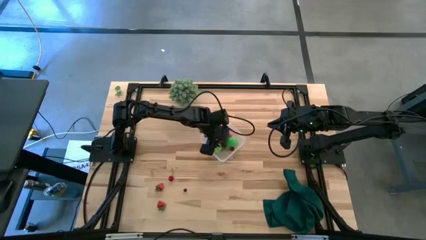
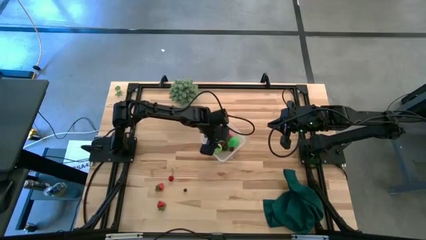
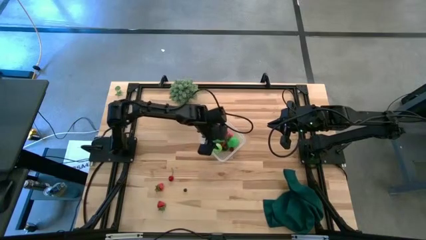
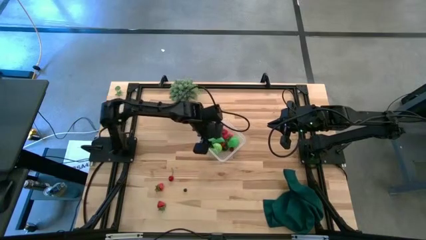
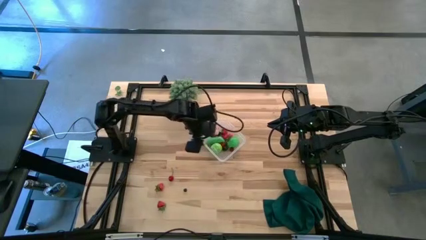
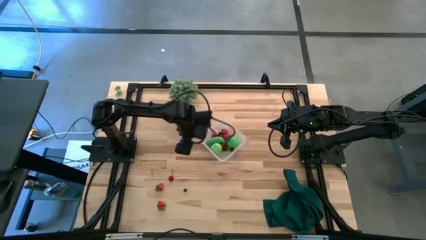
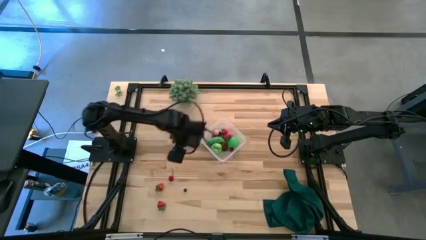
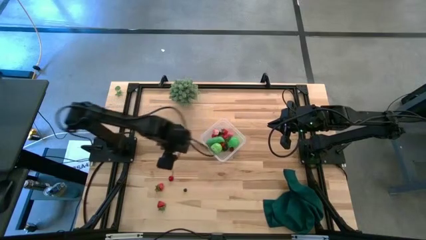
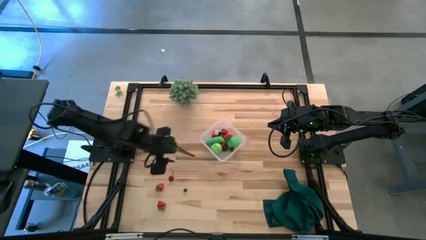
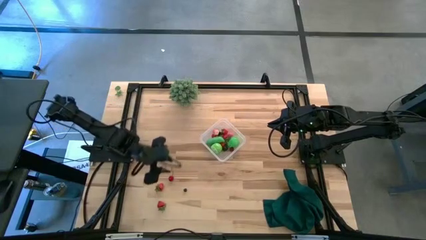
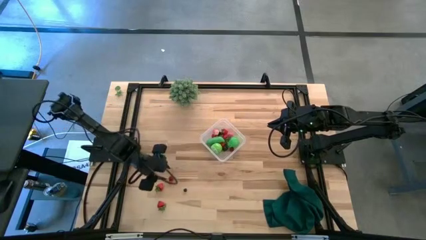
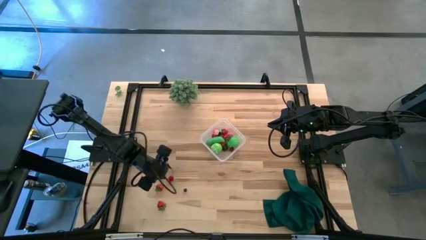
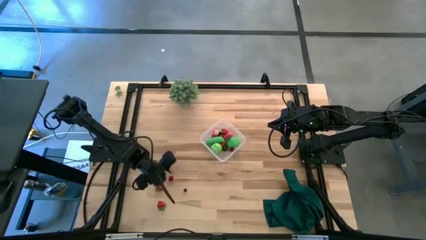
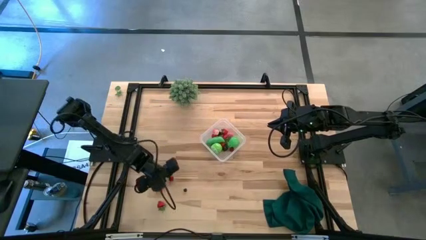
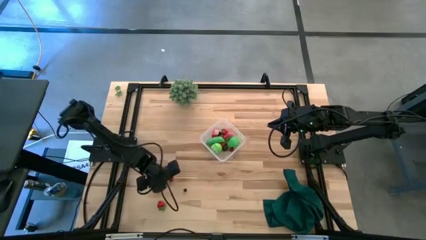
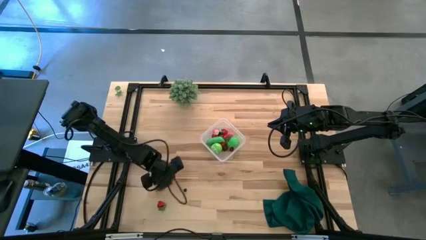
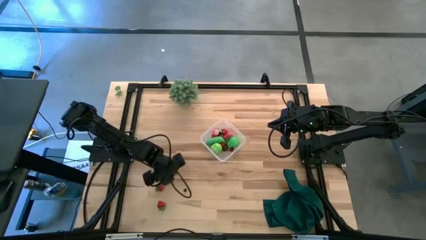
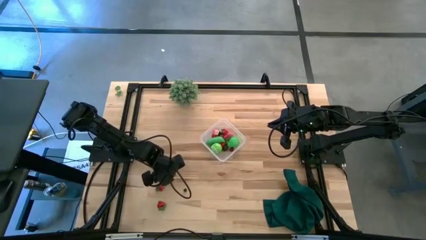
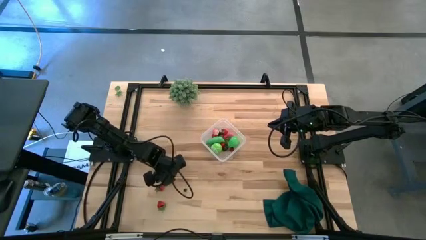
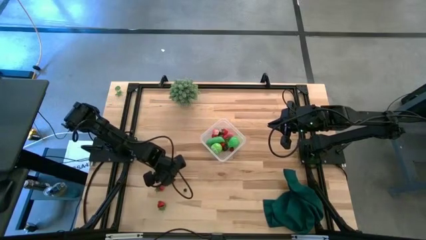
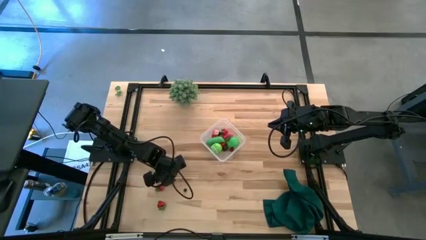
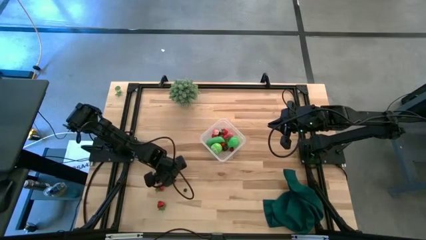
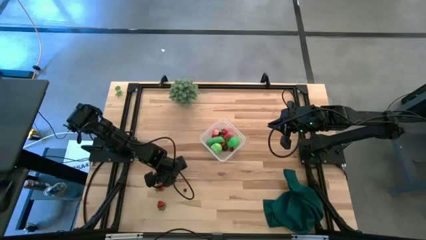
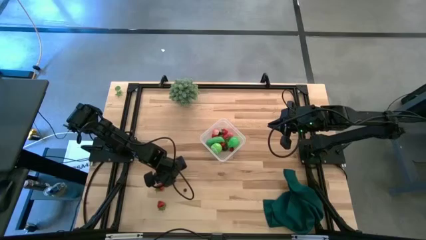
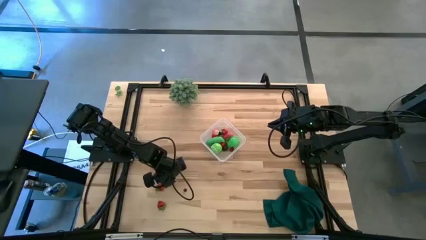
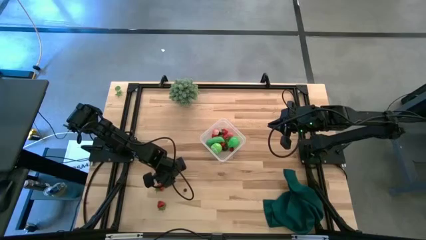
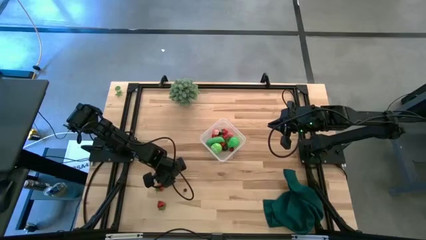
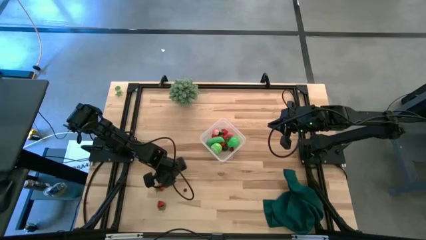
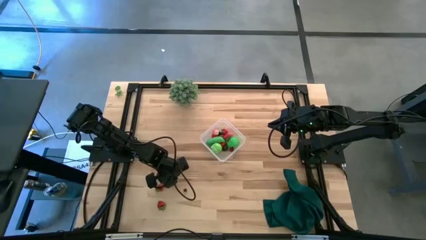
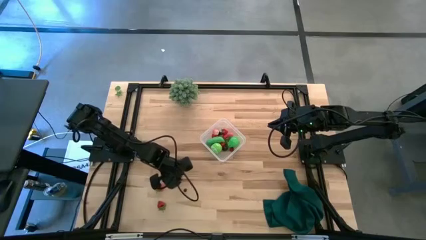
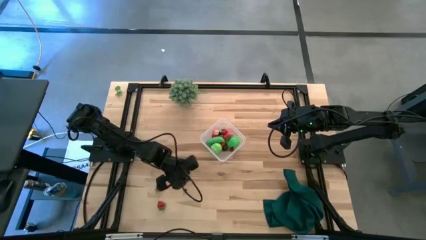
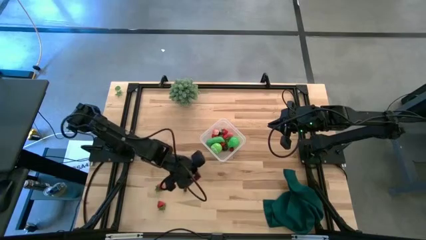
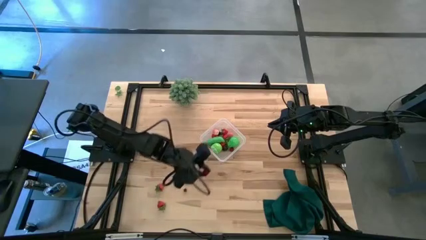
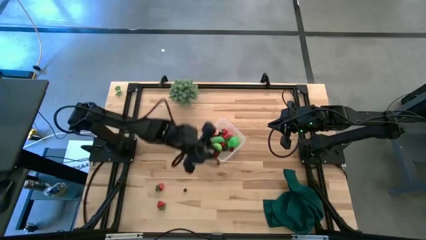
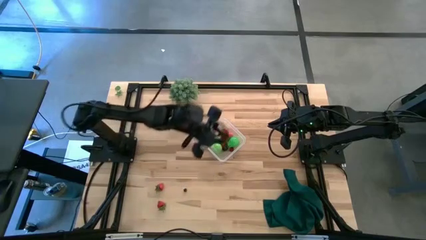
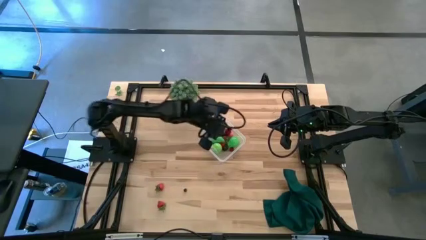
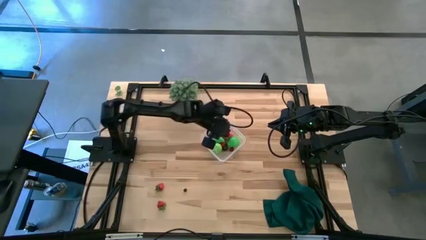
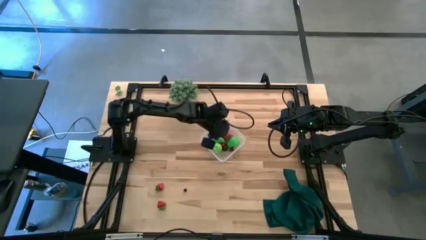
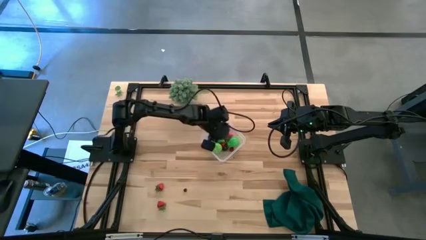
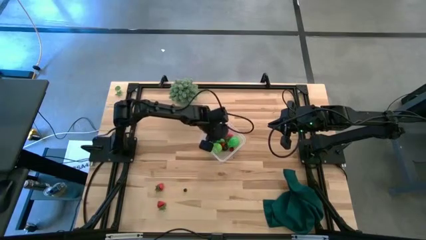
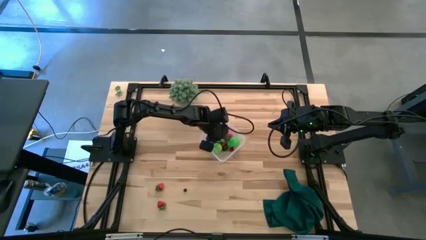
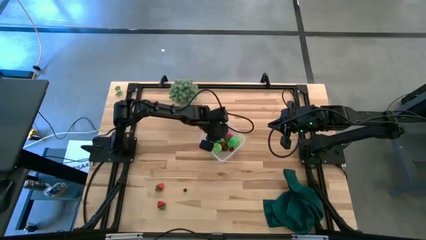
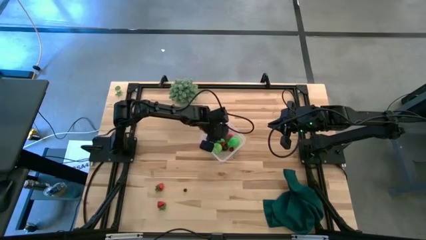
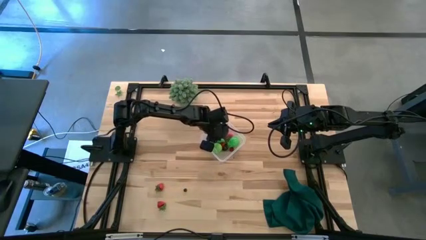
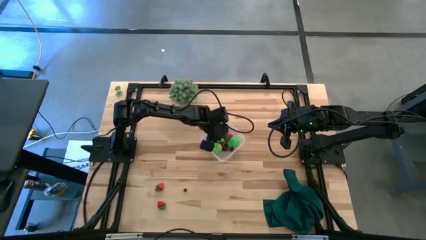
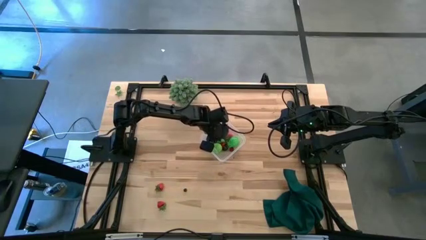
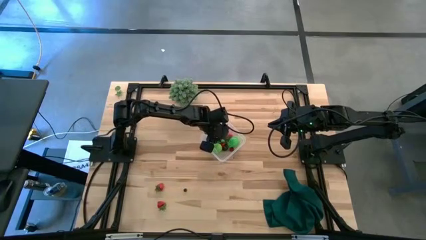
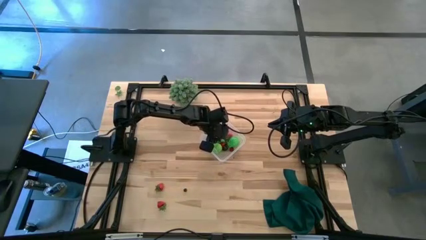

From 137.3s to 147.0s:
Task: Pick and placing Produce into tupperware
Put the red cherry into the transparent bin

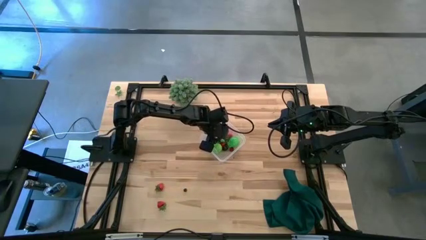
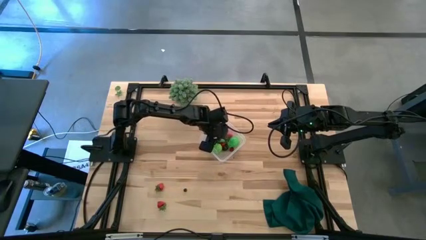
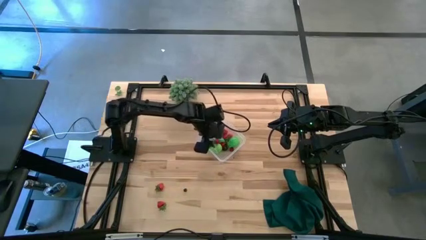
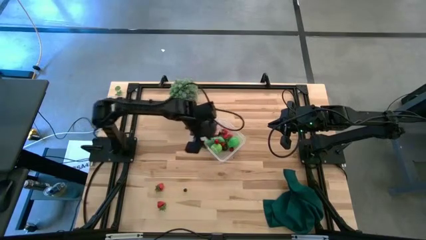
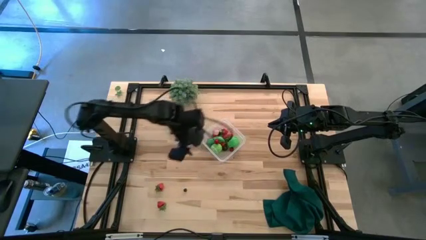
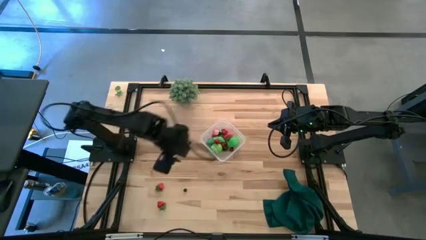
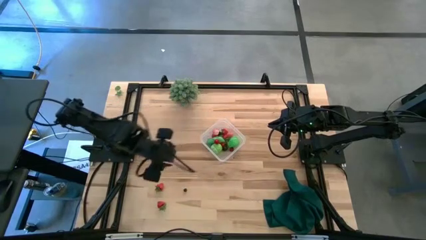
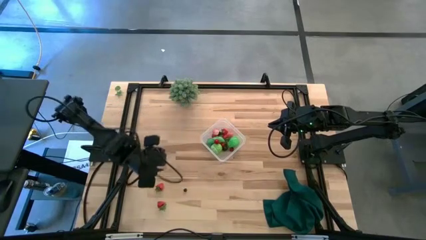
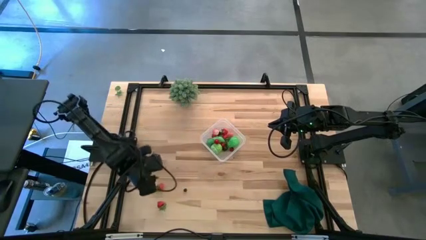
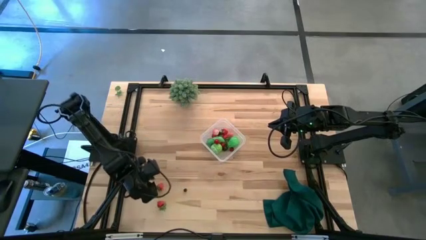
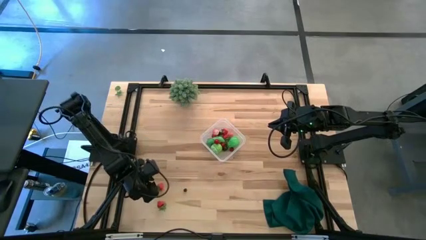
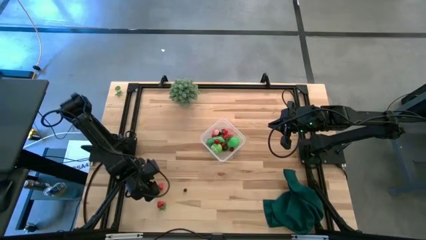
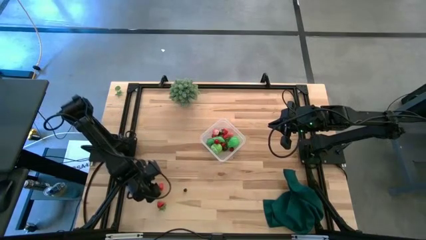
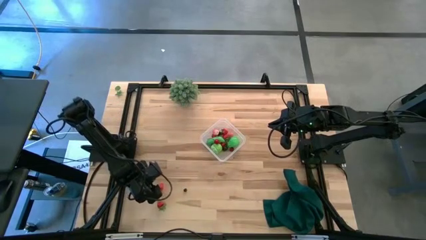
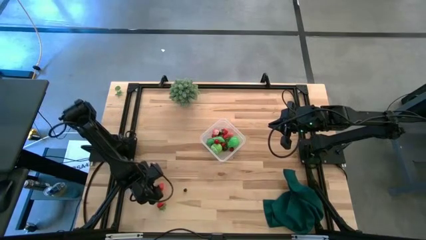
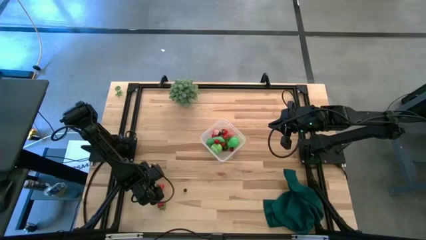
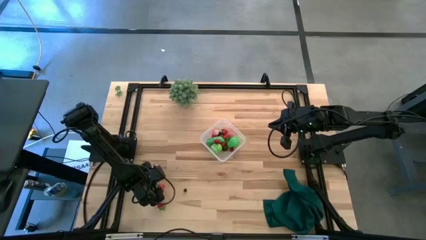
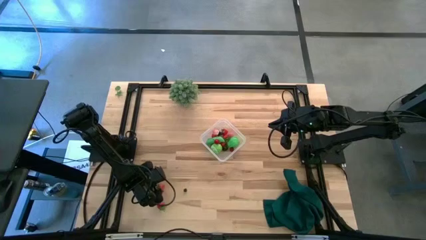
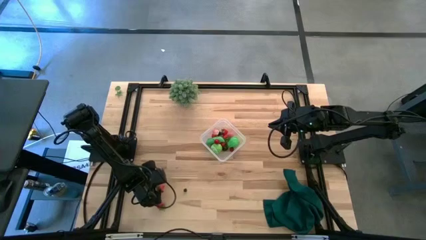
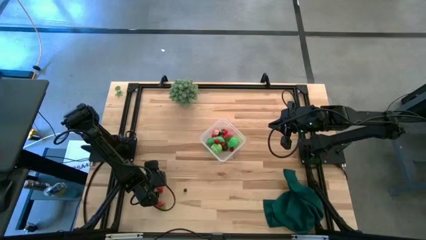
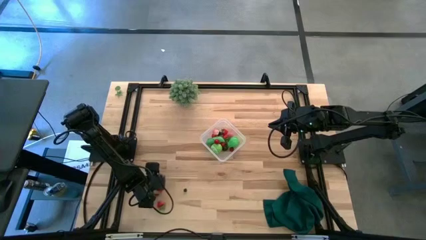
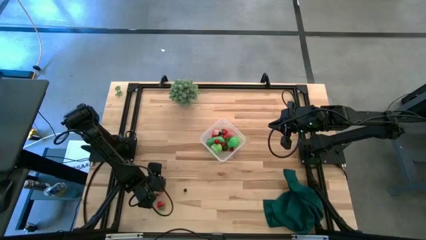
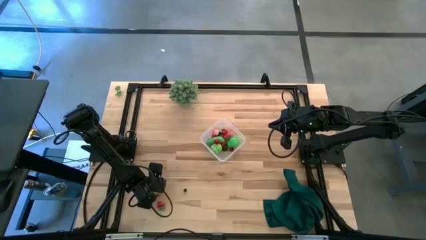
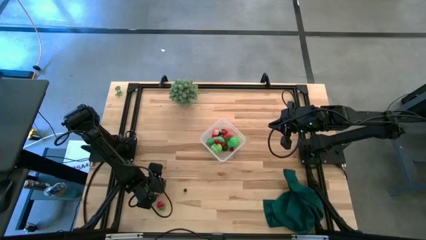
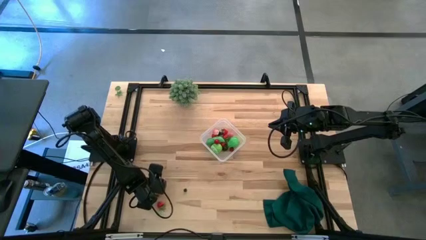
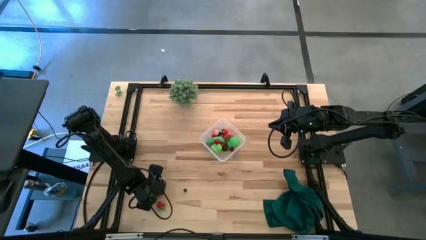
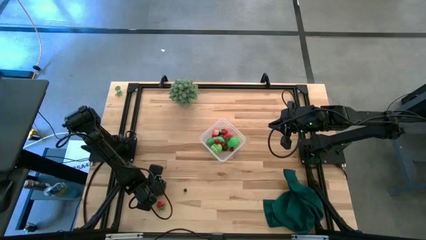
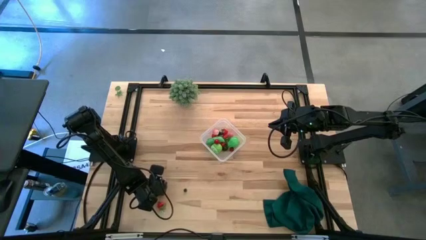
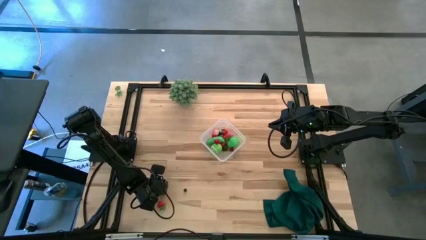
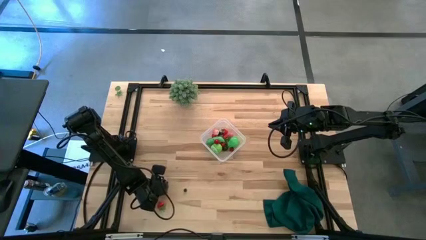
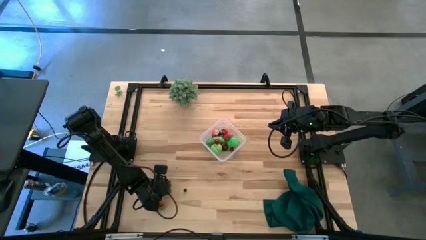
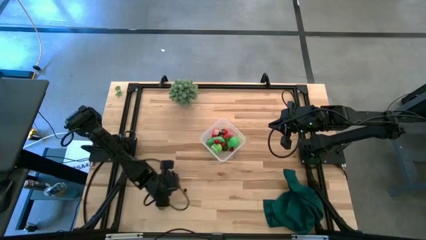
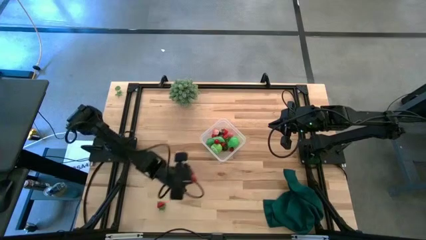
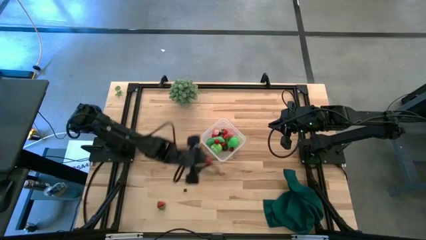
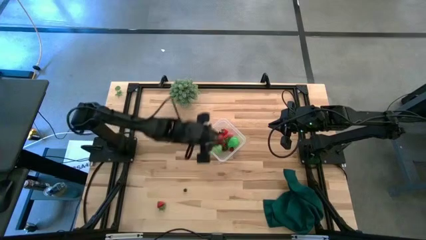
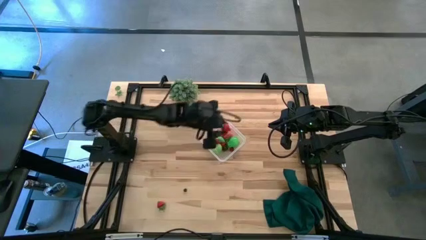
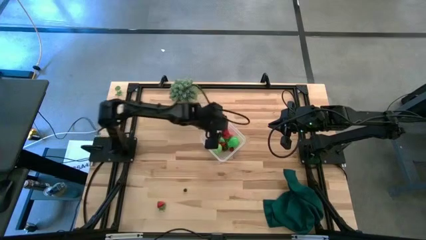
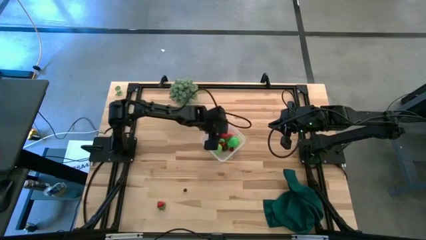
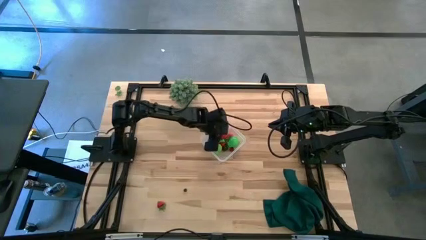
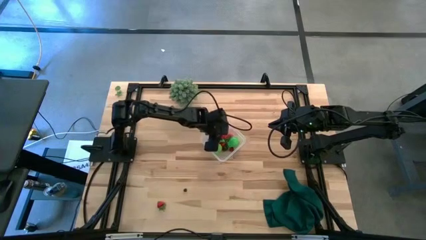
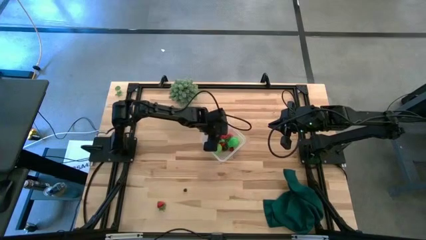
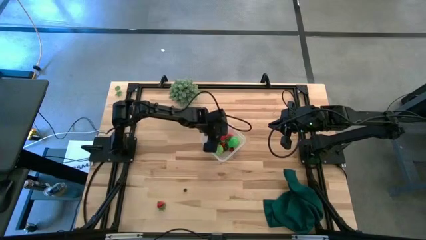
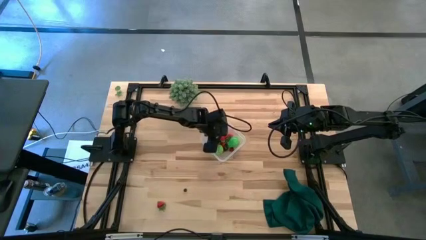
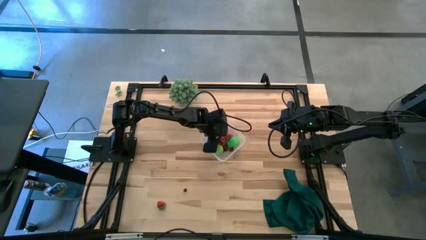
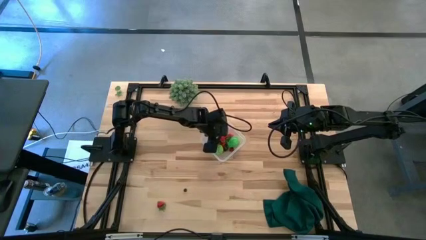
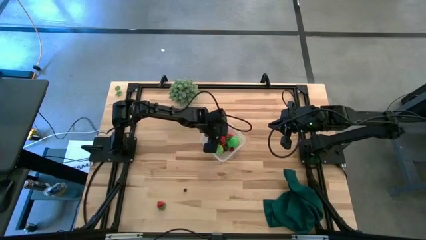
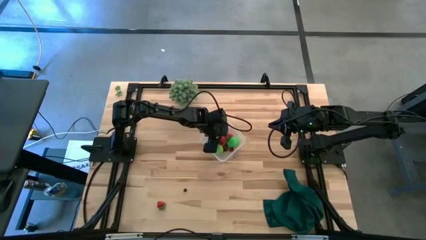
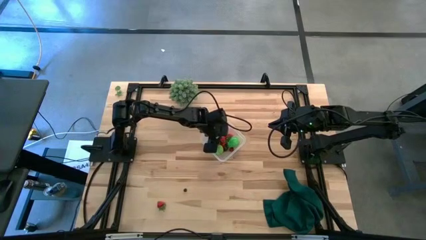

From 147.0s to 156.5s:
Put the red strawberry into the transparent bin
